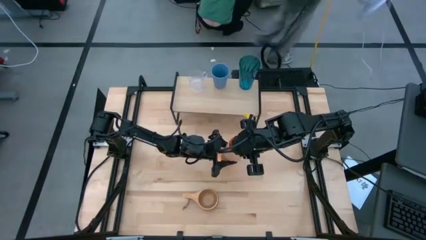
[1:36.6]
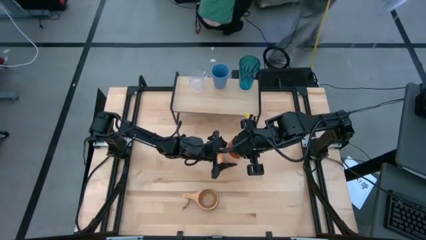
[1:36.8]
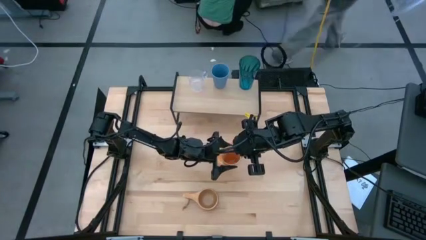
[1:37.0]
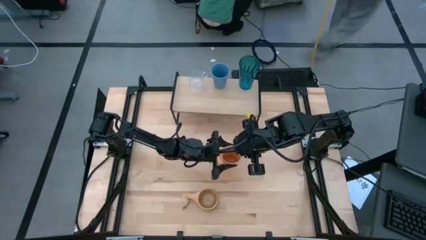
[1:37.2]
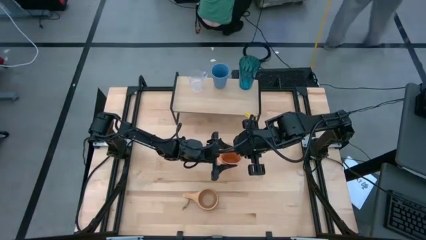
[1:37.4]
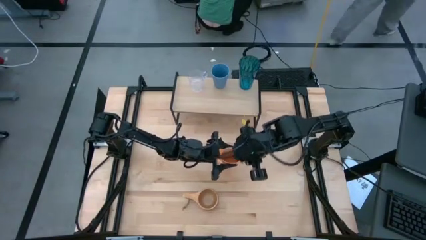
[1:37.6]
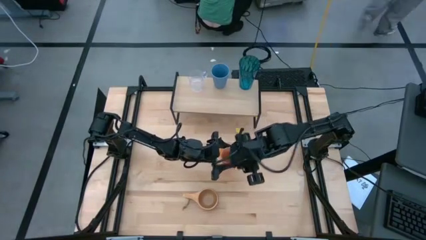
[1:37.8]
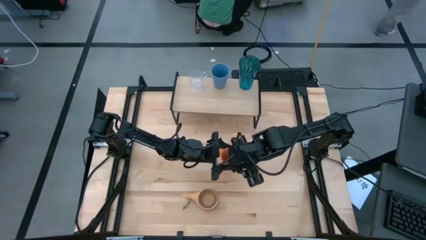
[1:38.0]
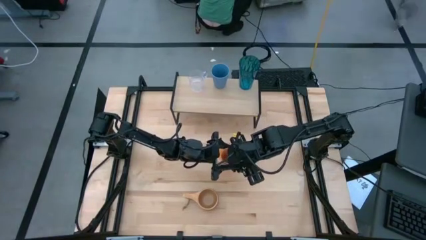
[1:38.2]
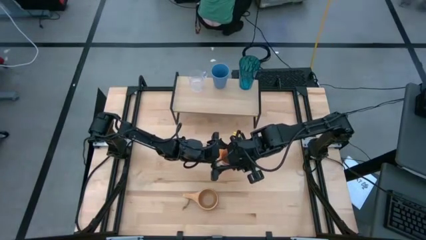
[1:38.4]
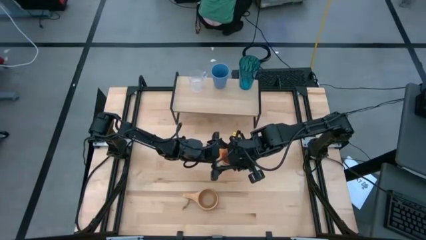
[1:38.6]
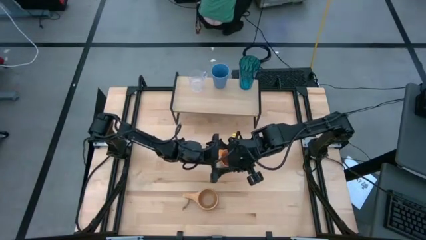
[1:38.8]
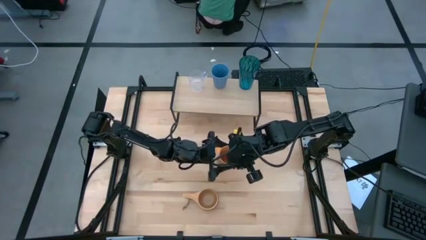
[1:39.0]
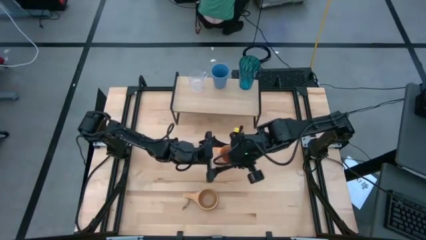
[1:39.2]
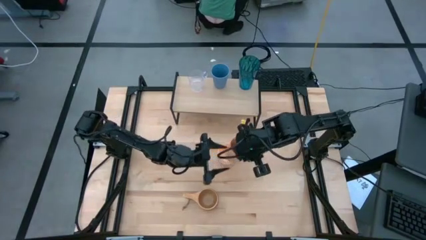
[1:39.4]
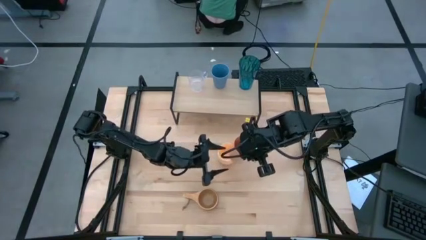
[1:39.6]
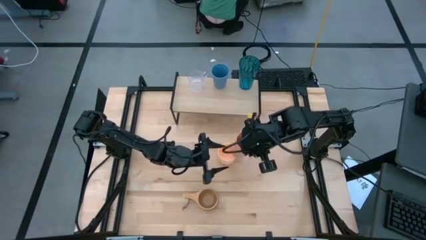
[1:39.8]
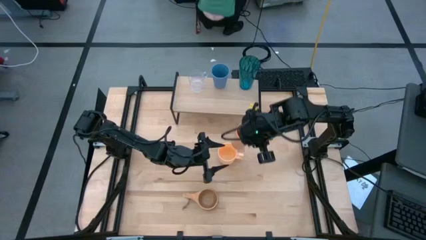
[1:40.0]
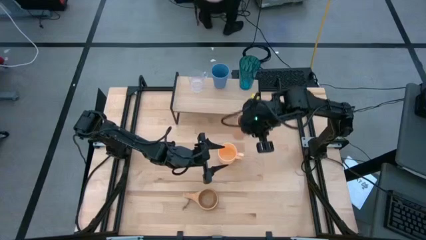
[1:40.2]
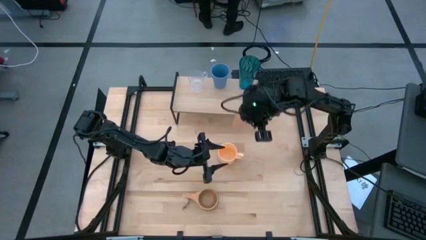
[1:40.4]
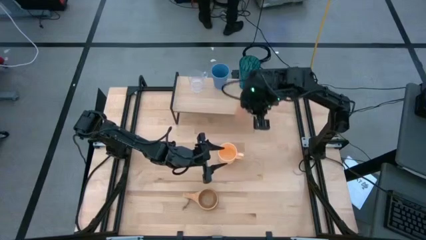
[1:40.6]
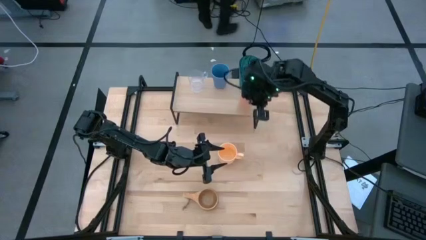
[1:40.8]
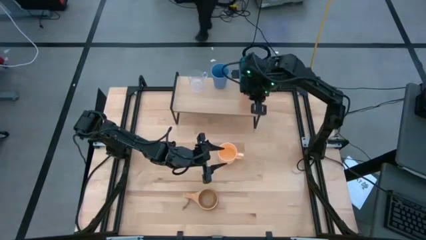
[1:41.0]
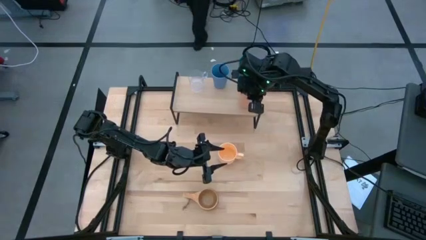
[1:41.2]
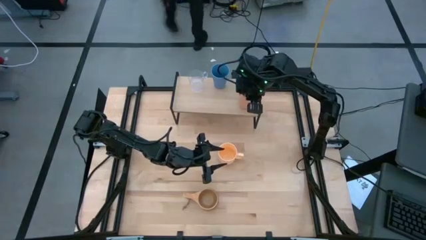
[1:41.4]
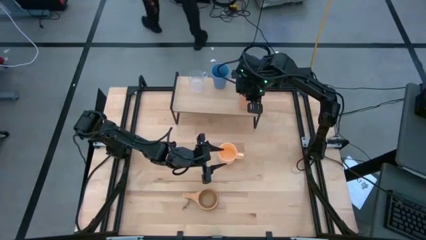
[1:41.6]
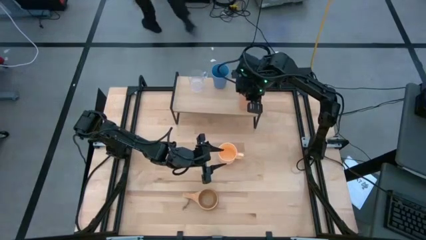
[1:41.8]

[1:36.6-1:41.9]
Task: Stack small to large cups/mugs on shelf
Put the orange cup on the shelf

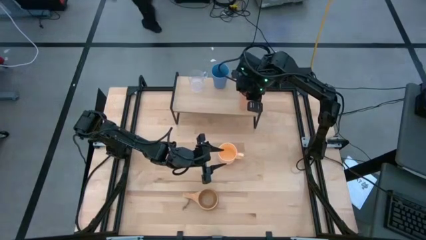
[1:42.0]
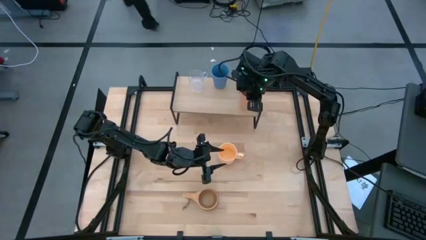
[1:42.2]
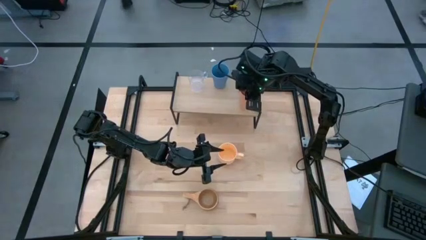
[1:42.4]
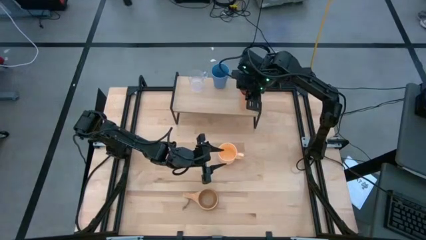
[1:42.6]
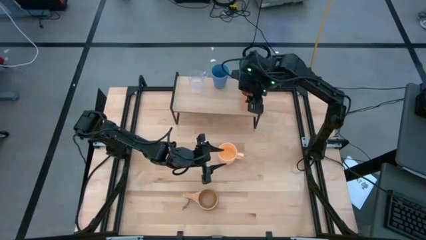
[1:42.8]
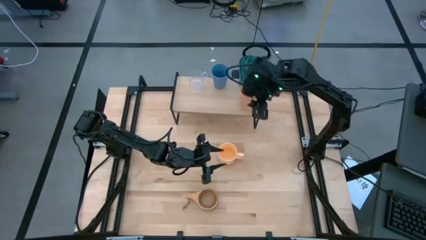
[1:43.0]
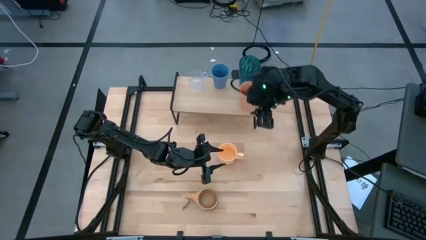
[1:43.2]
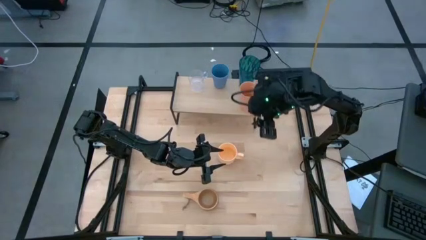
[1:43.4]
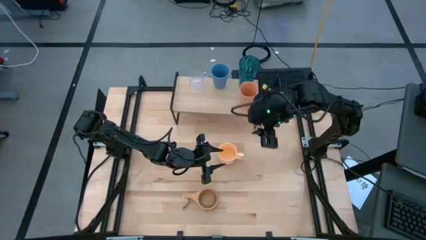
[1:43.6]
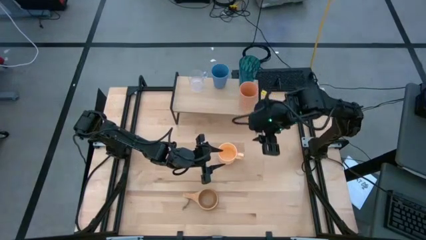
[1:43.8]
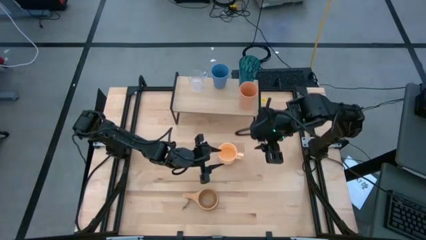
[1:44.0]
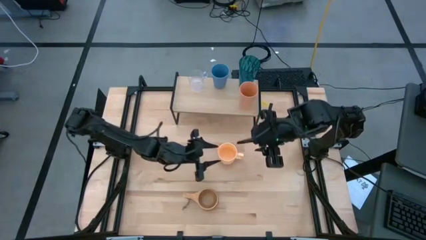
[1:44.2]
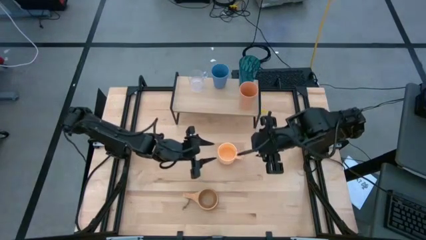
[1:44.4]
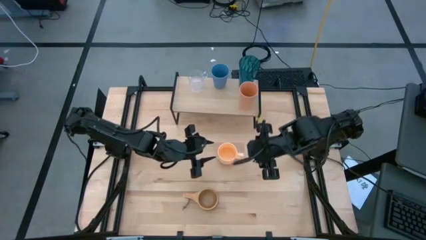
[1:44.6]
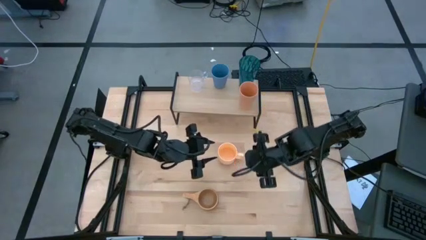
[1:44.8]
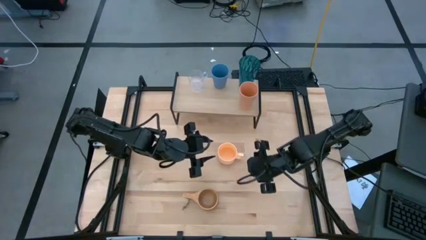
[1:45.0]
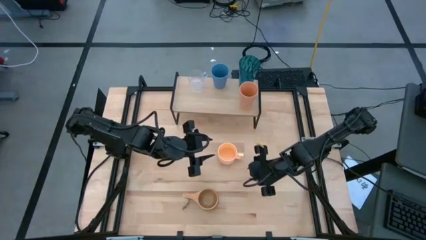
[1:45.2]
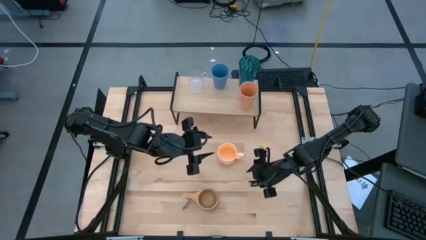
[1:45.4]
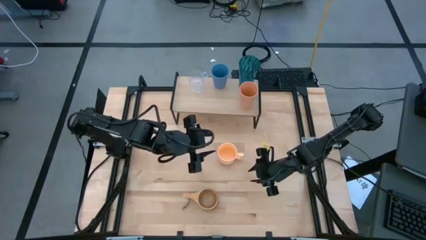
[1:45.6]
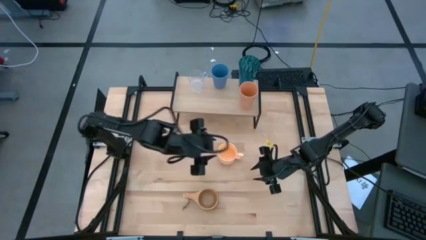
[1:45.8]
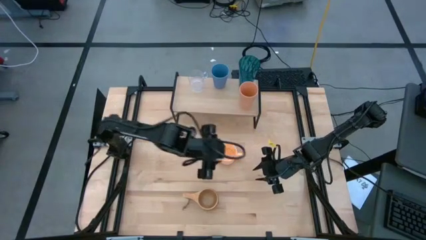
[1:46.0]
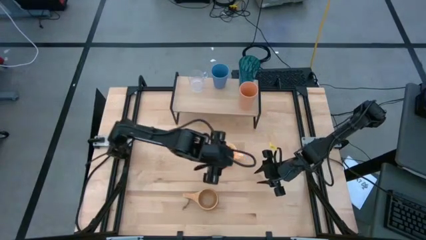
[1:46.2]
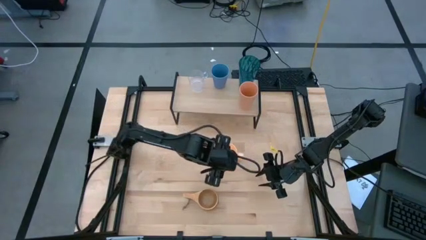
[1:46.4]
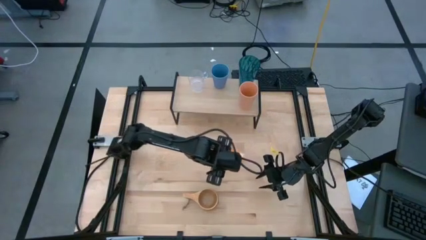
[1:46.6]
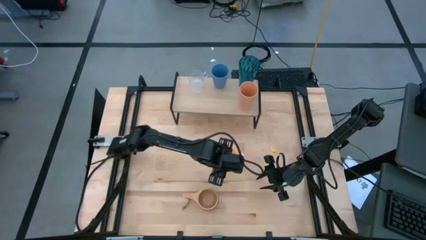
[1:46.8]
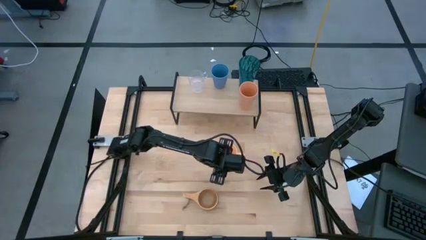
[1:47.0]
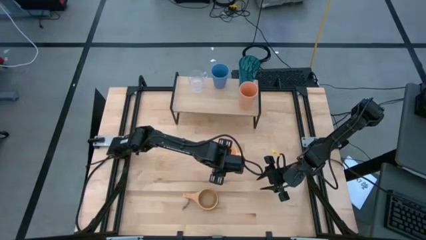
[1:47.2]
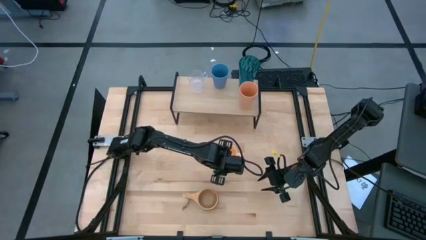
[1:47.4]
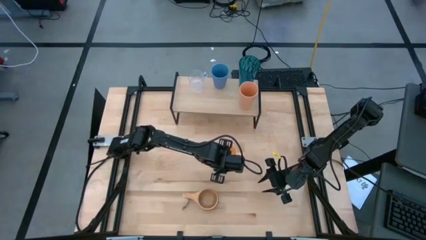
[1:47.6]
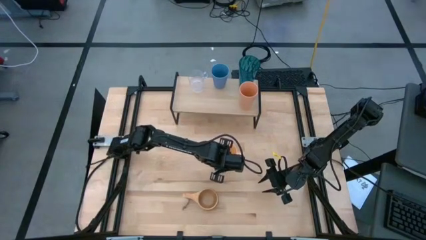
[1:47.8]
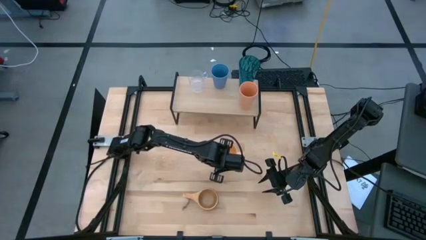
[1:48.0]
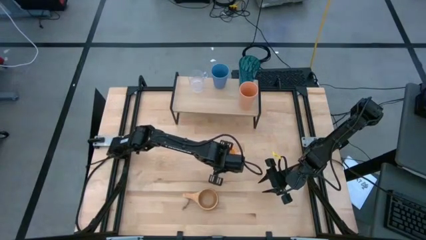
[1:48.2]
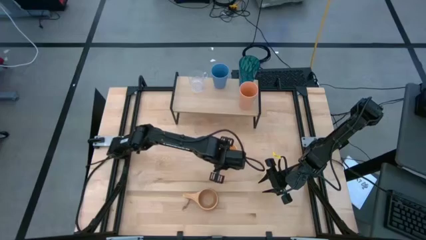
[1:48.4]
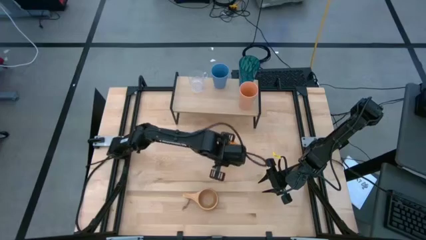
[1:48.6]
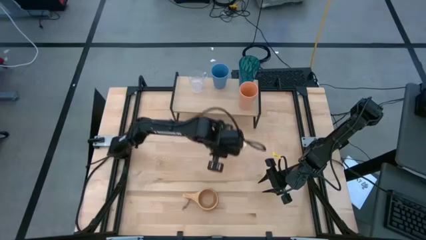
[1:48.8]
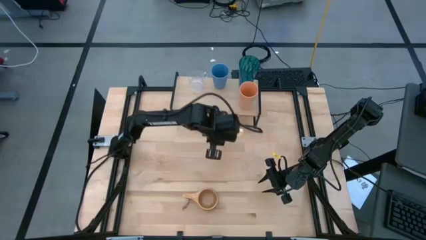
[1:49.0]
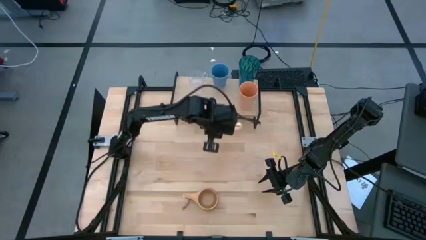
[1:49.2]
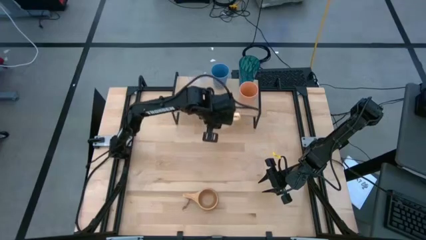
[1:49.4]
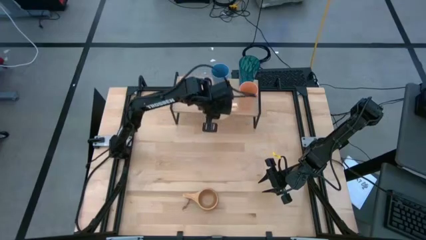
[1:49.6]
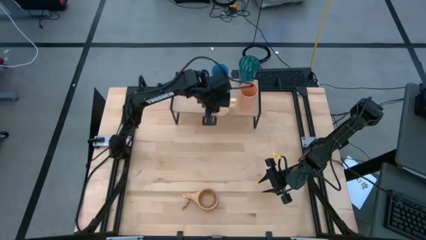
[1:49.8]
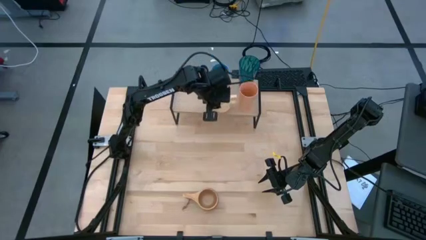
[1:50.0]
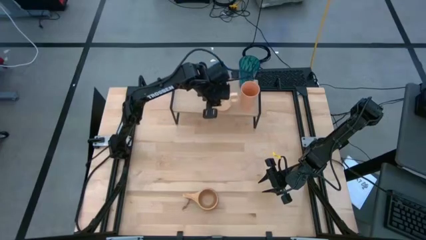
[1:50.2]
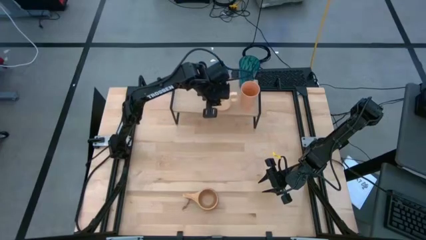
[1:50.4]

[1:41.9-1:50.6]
Put the light orange mug on the shelf
